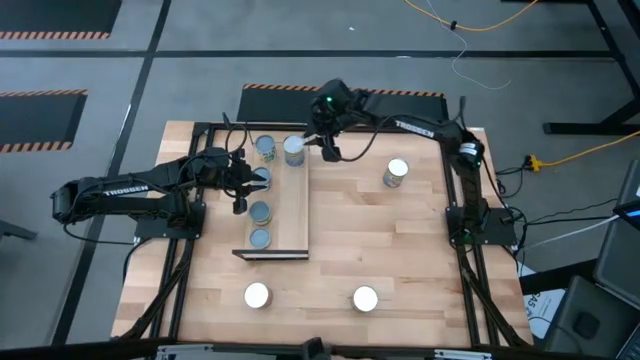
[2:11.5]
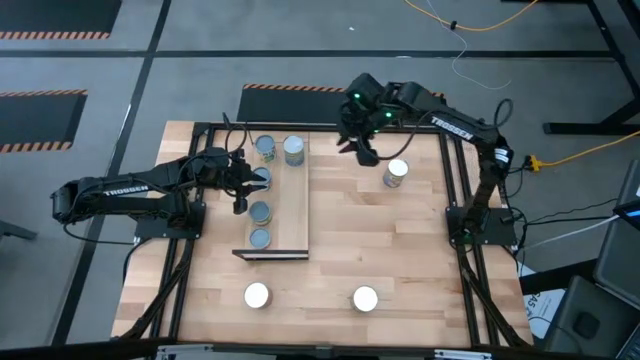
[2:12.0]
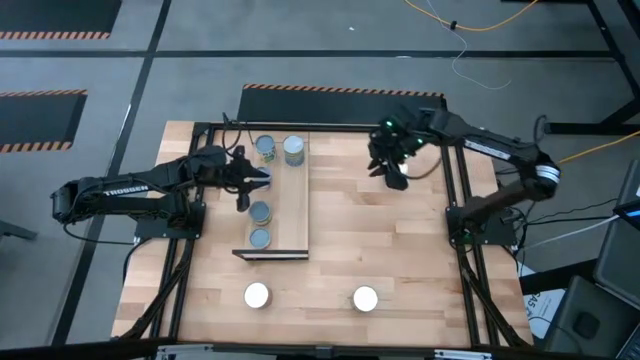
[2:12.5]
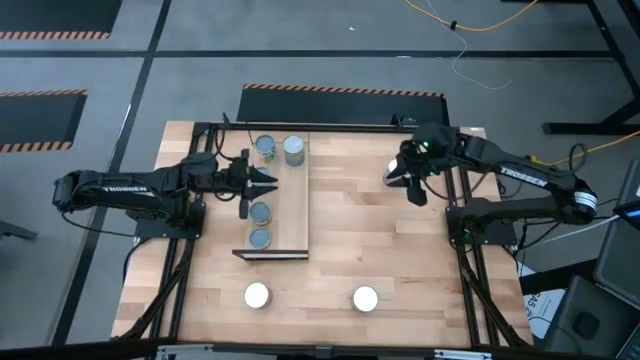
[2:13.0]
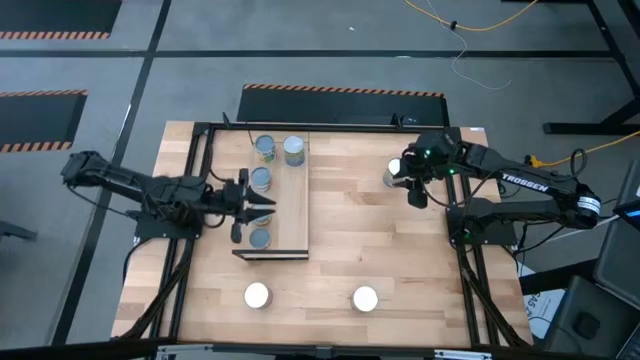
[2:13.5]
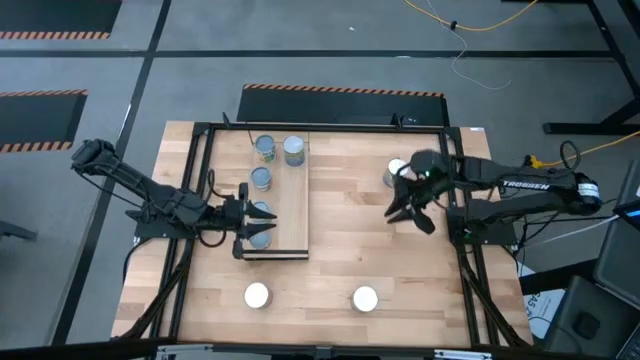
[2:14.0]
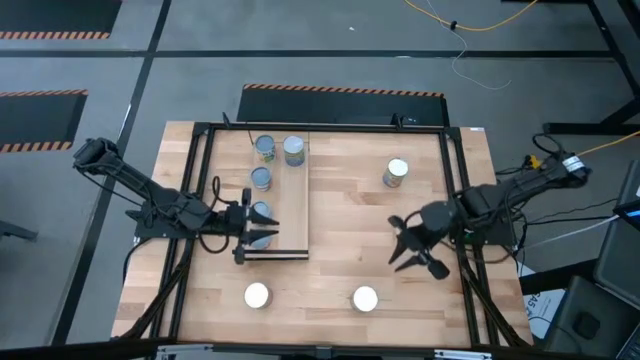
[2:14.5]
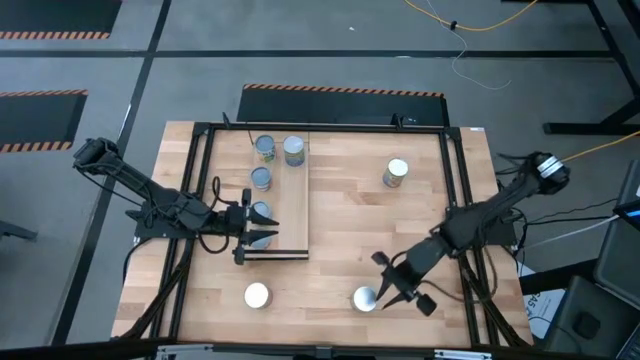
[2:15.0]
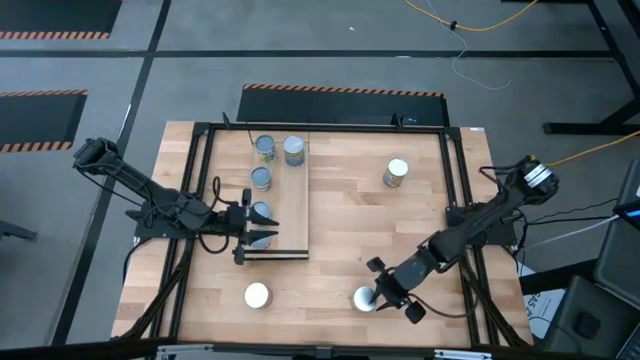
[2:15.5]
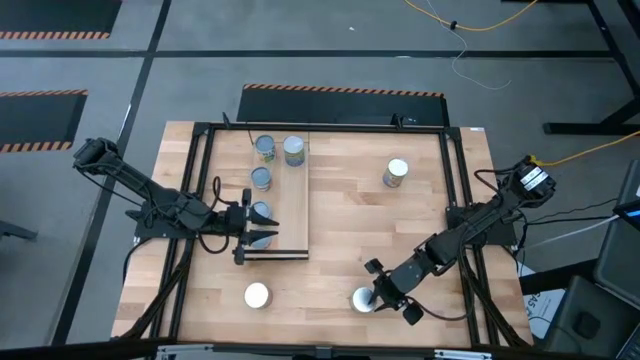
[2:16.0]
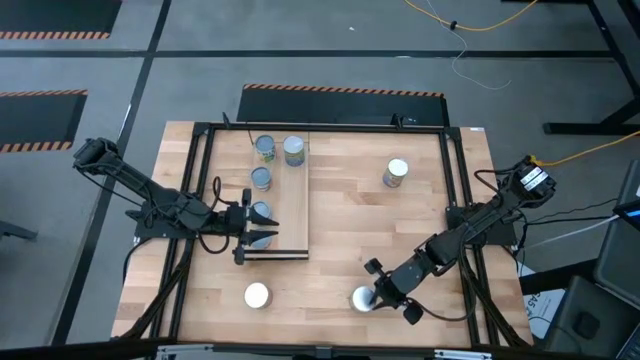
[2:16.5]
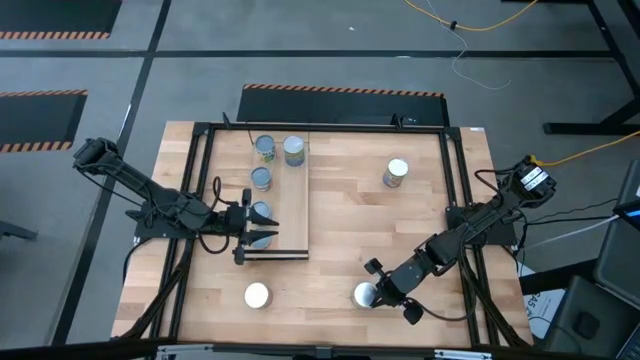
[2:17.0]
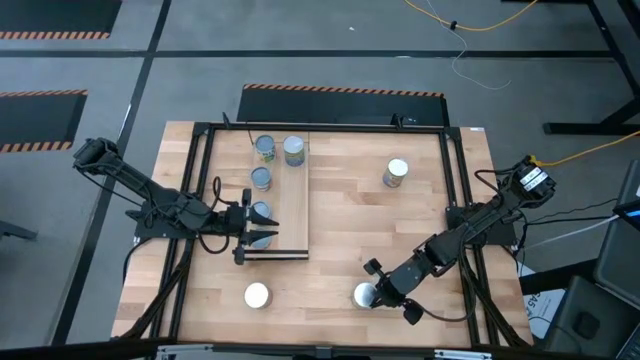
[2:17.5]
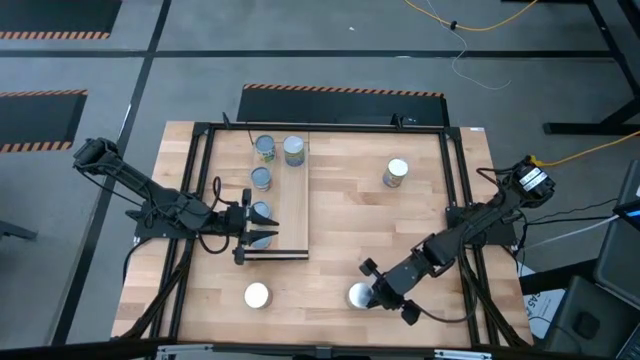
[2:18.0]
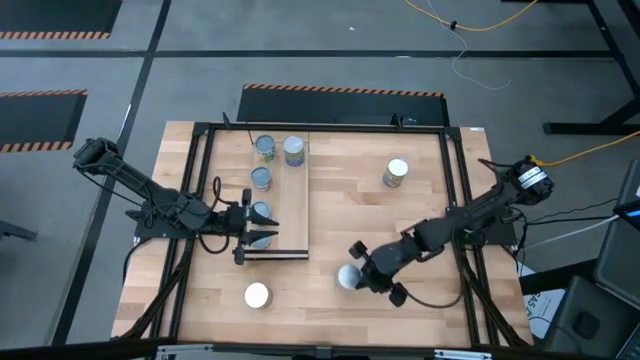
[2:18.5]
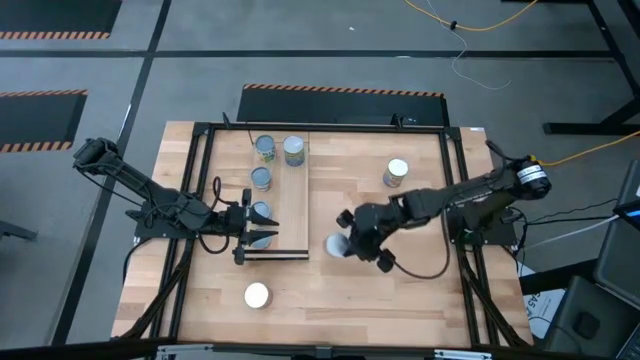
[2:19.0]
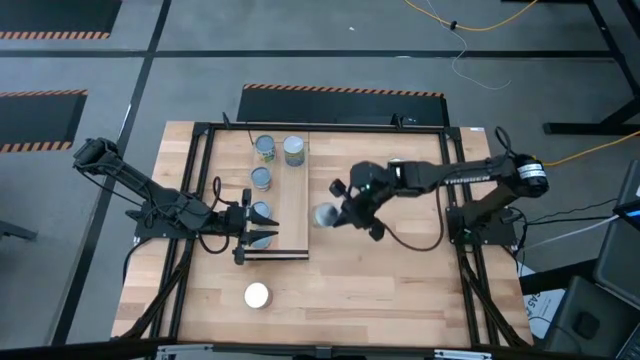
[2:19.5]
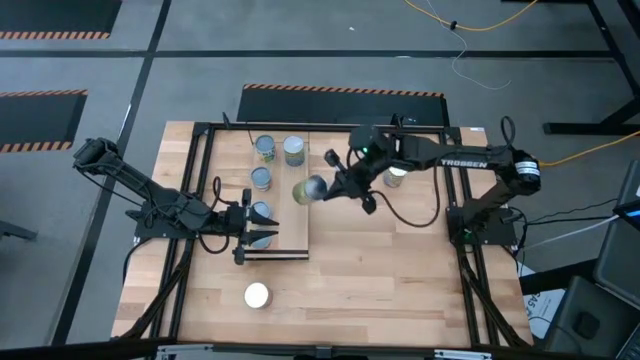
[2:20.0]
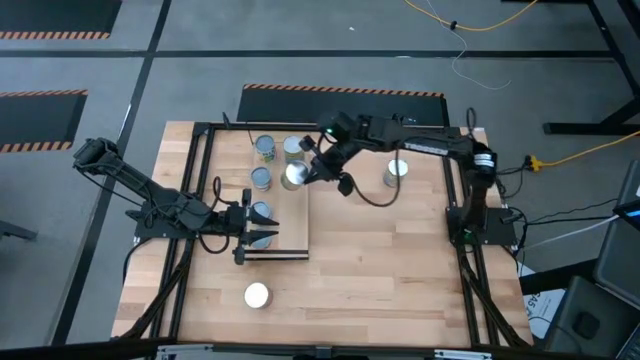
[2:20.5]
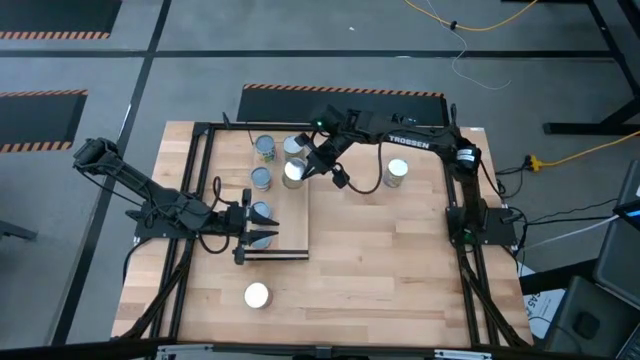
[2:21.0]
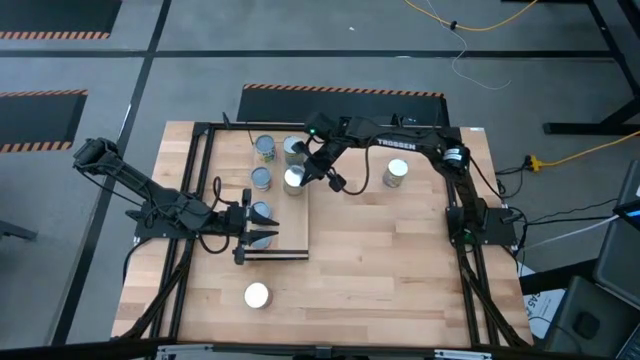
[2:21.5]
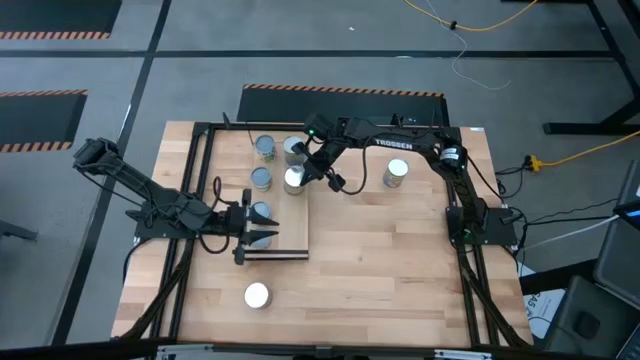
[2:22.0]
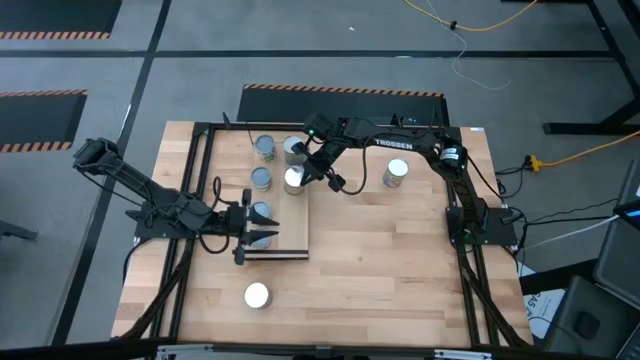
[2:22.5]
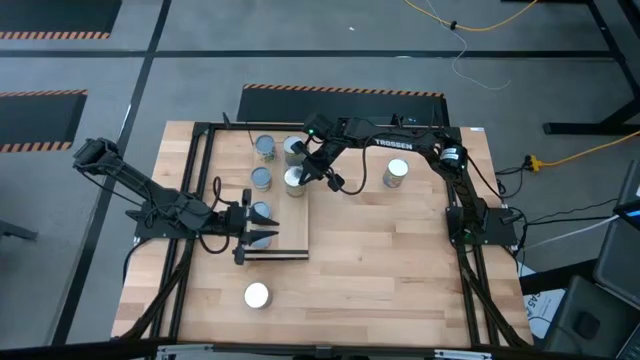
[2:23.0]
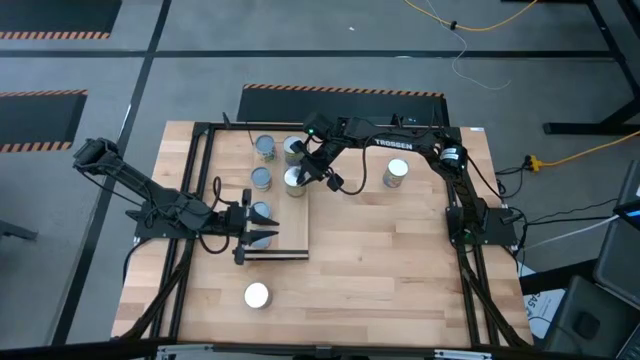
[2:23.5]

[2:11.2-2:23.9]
Task: Pick and place cans onto a shelf
Put the large canned oranges on the shelf

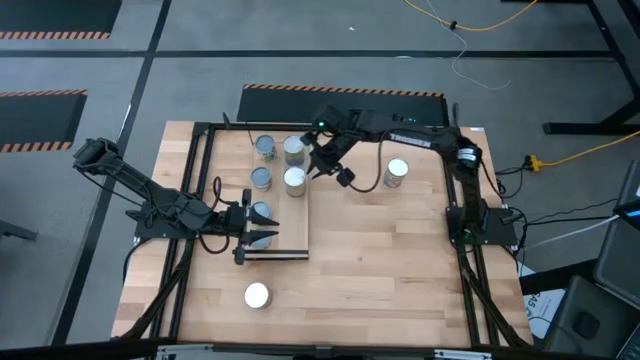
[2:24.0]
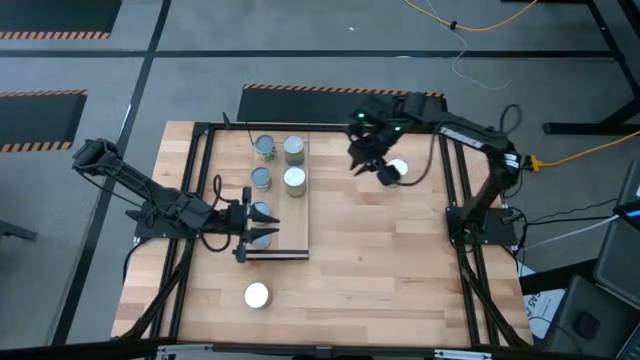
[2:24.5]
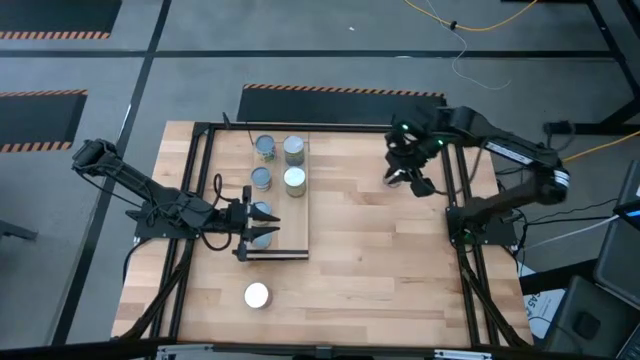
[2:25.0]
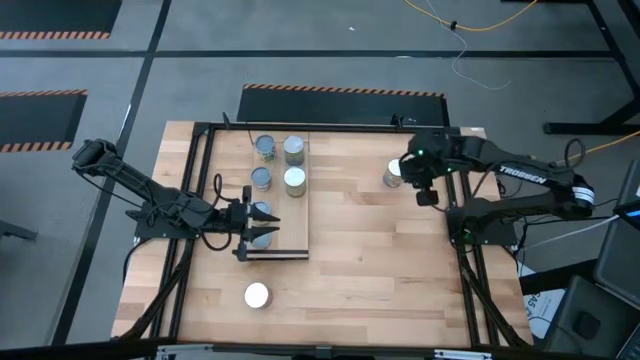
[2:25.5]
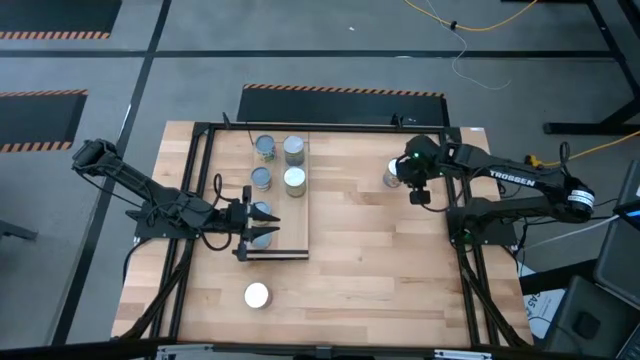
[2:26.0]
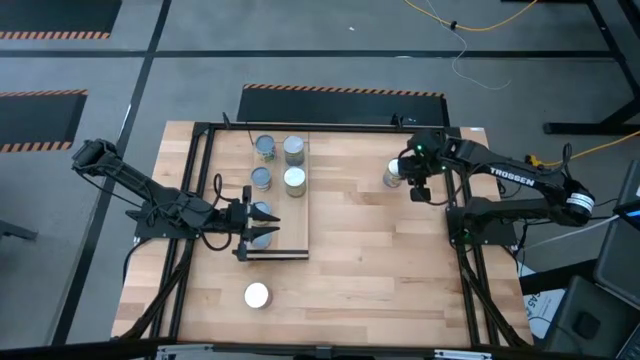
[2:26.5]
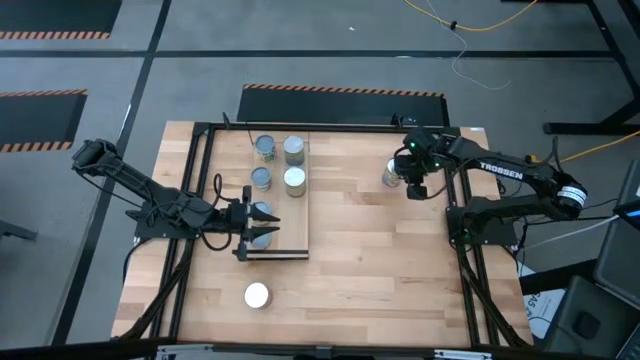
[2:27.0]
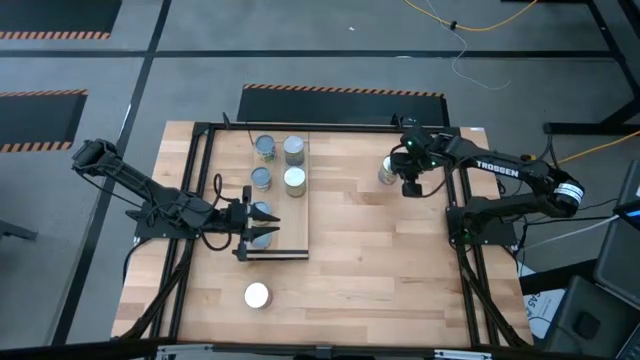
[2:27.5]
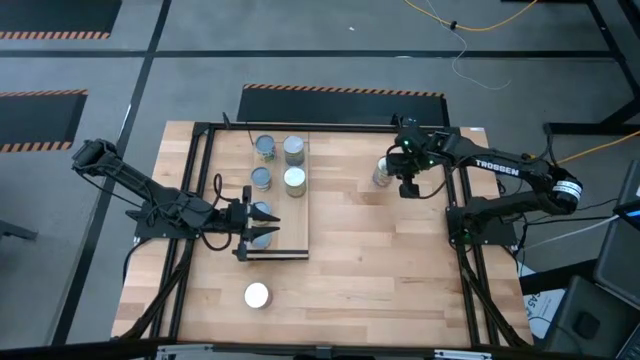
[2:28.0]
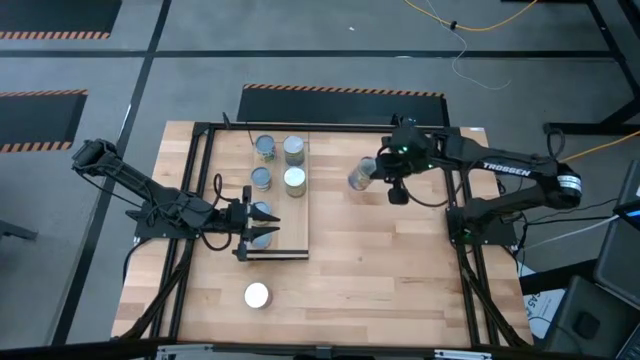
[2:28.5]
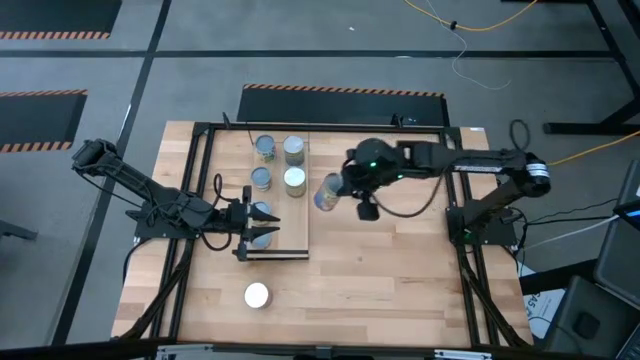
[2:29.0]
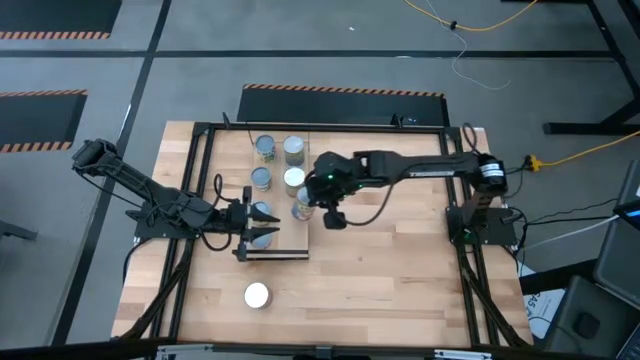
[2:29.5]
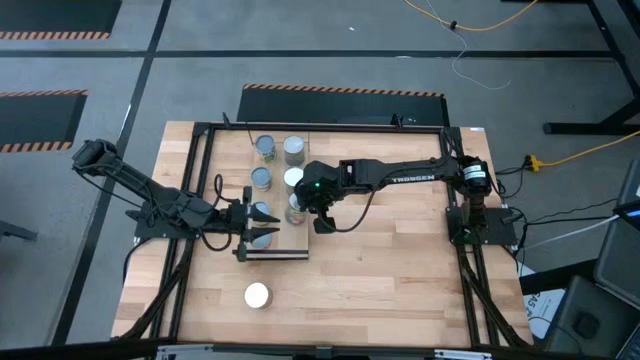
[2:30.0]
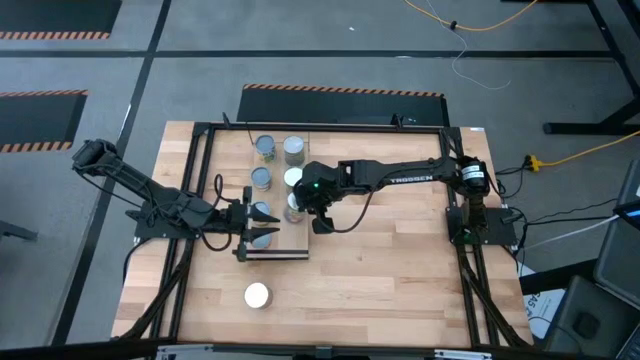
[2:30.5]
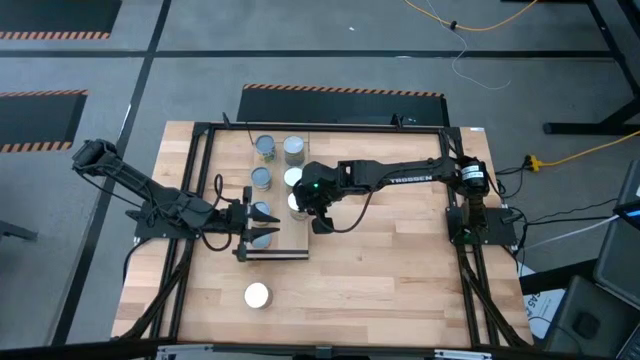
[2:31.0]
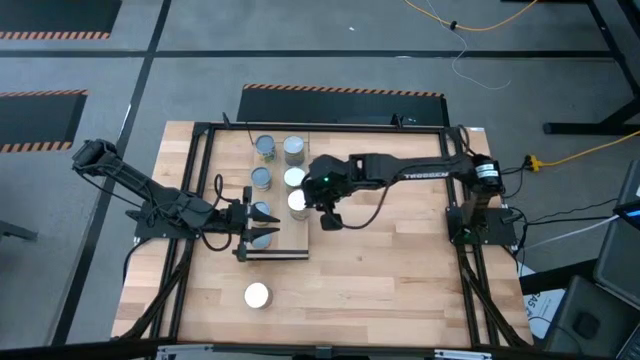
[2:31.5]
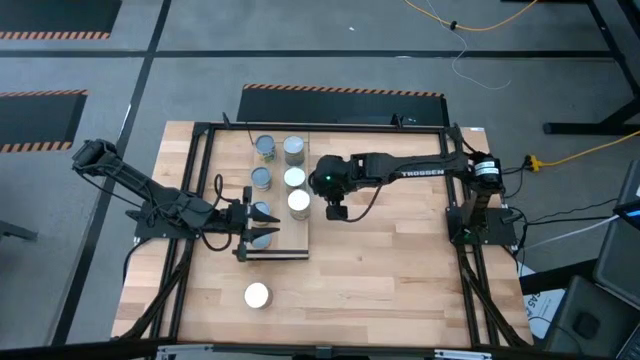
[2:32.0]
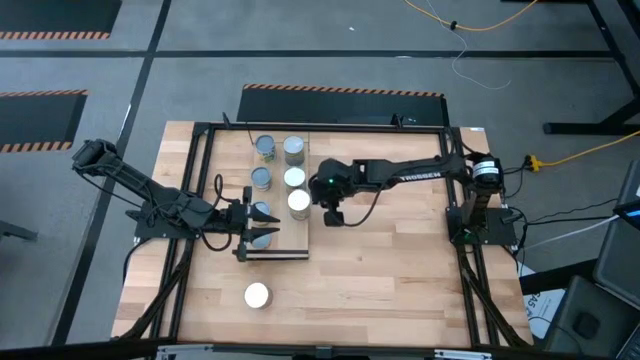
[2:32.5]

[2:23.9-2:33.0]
Put the large canned peaches on the shelf
